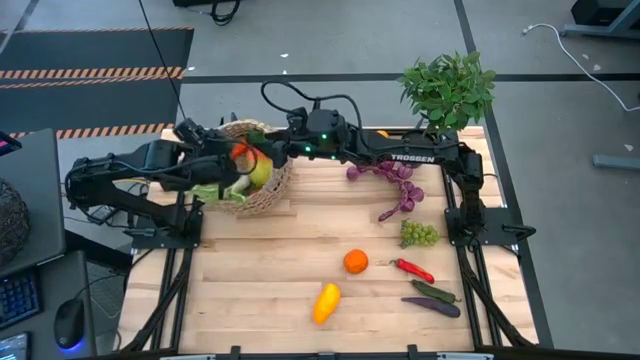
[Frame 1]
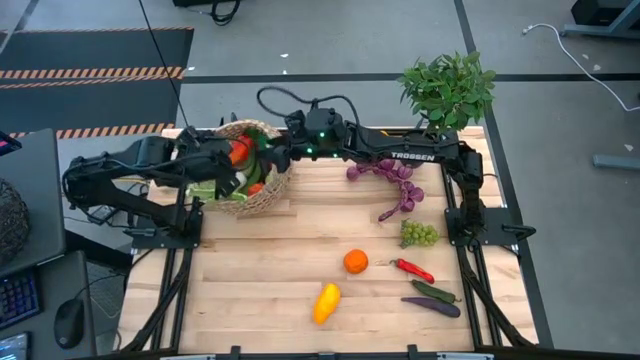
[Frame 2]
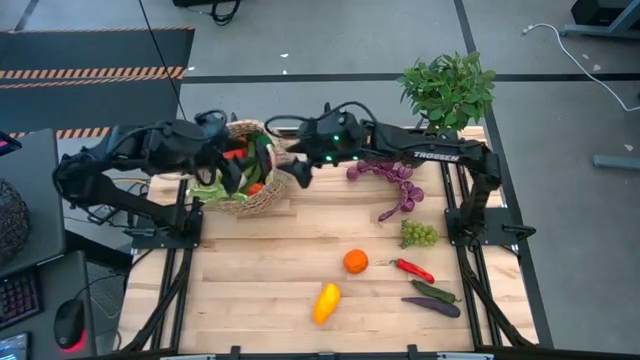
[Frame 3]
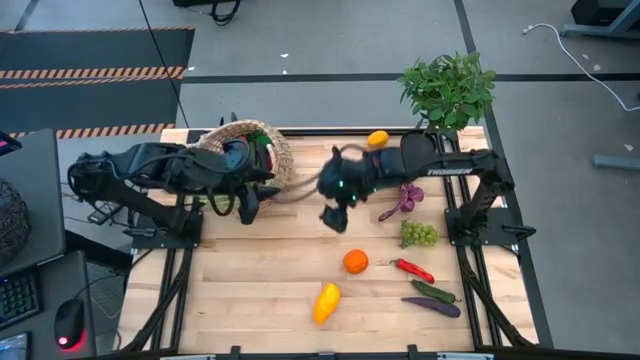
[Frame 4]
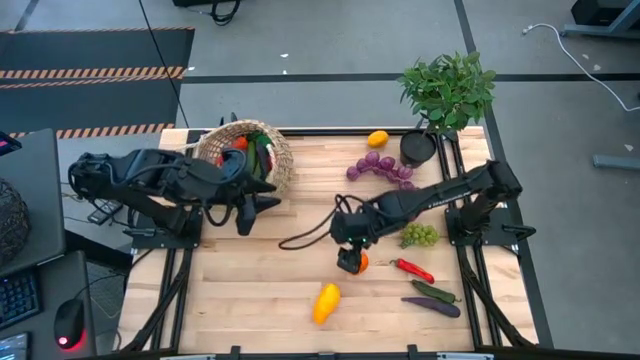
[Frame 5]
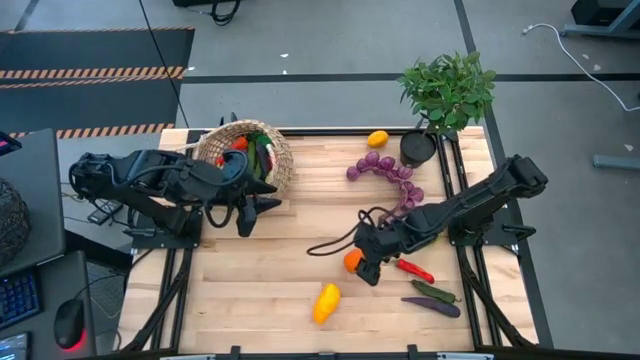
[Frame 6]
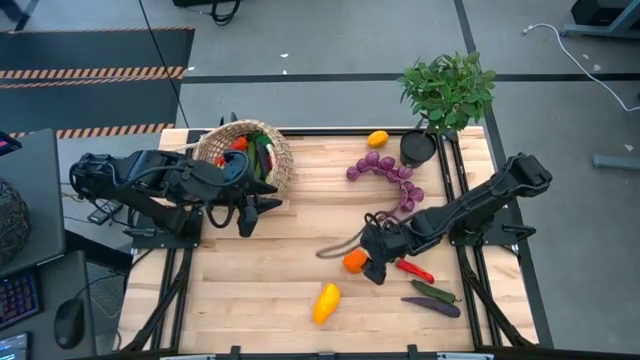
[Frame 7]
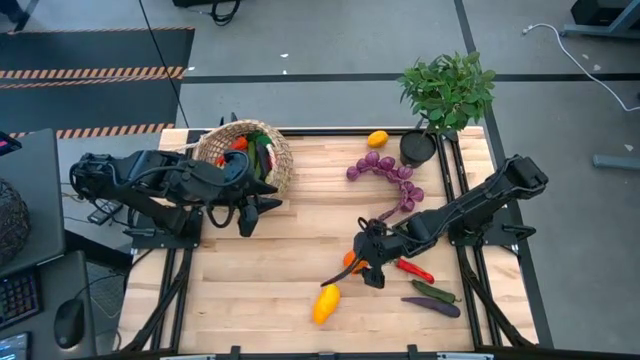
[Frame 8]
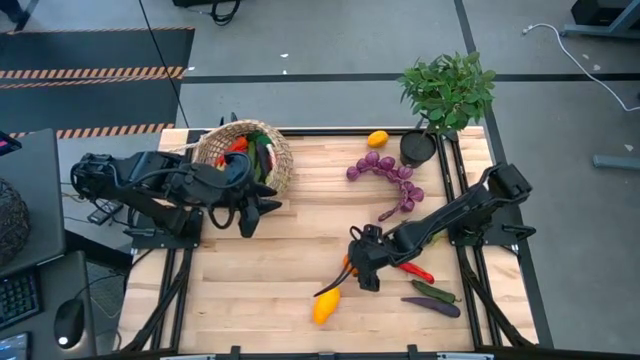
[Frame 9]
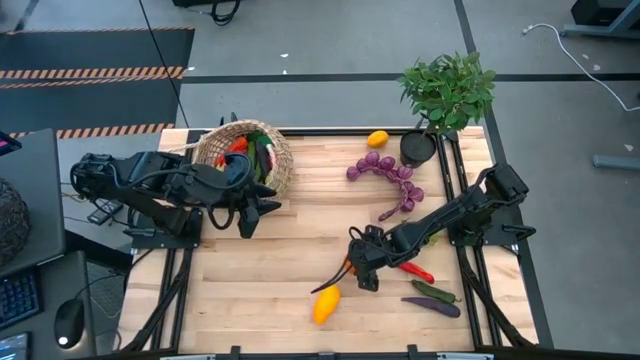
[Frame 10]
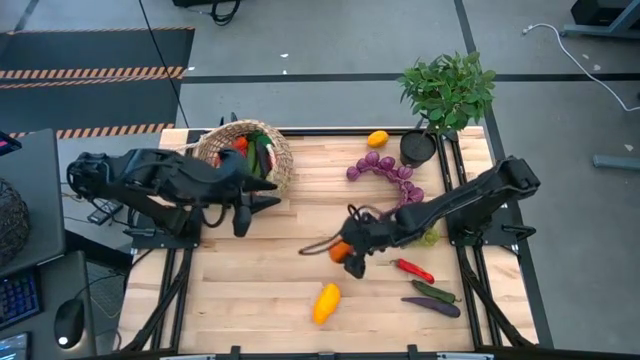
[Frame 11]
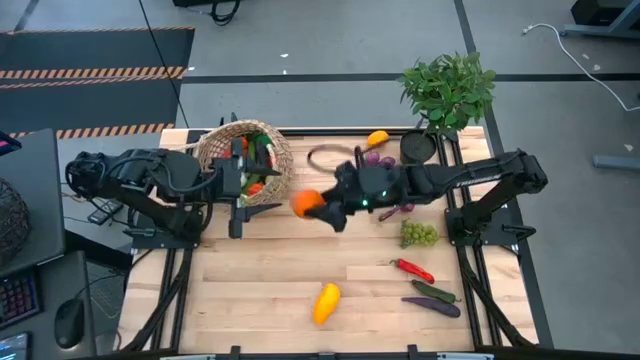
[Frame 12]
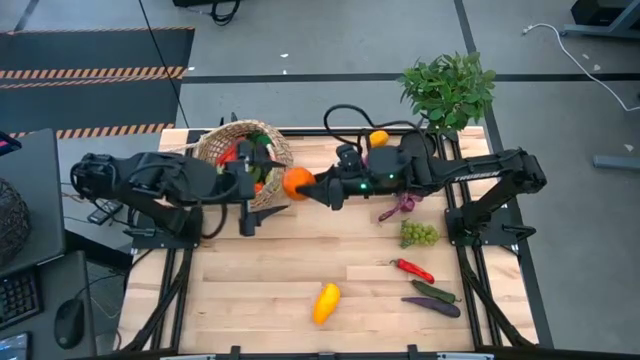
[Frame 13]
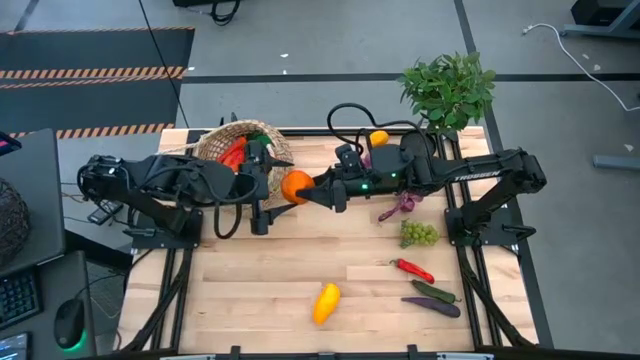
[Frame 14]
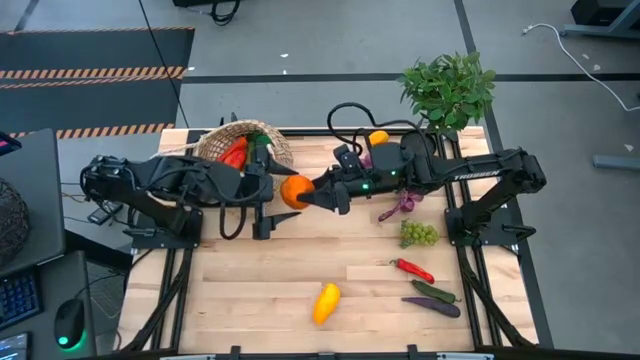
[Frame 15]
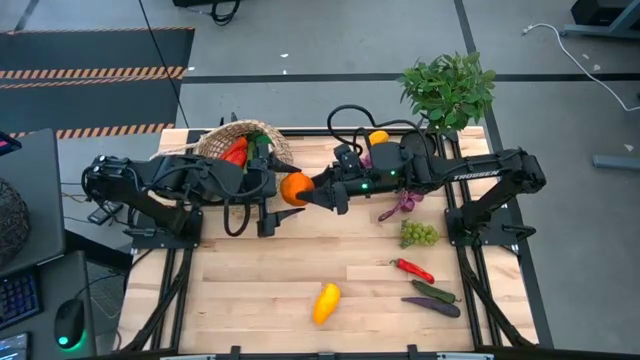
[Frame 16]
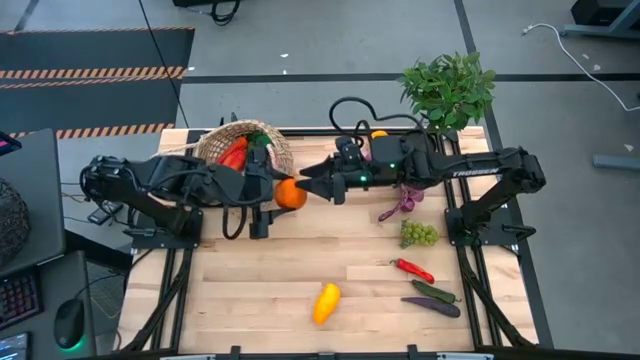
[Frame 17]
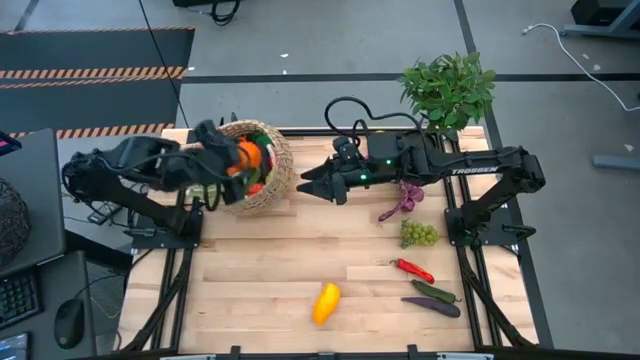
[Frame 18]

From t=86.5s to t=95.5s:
Task: Build produce basket
Put the orange into the brown basket

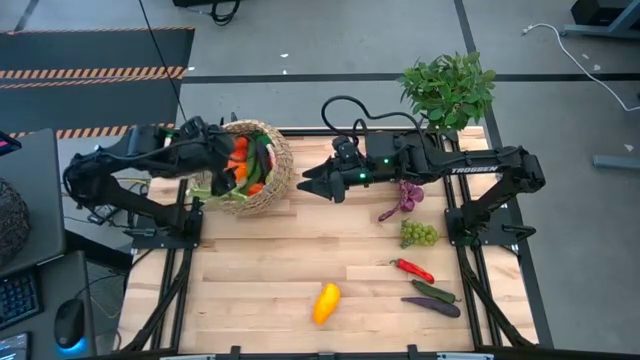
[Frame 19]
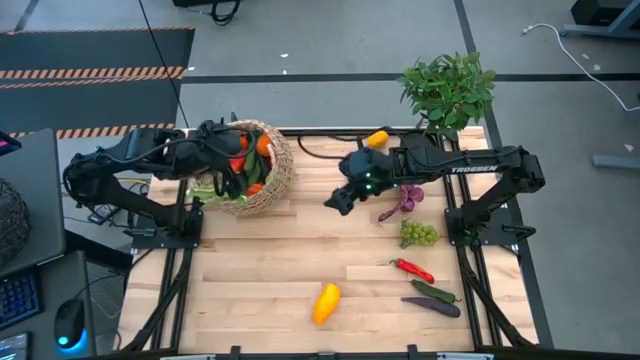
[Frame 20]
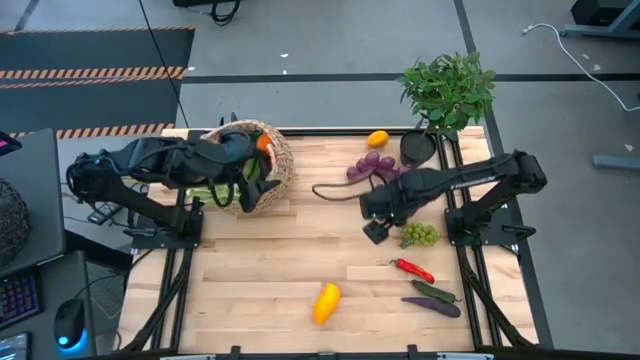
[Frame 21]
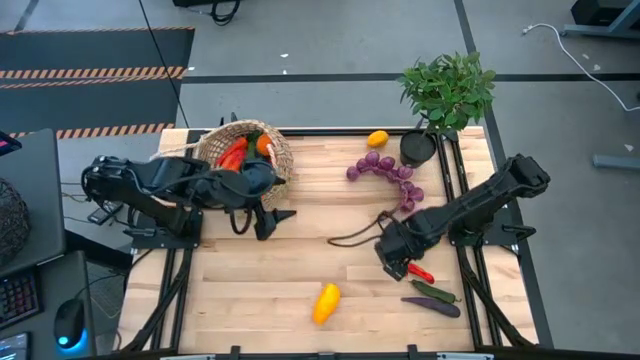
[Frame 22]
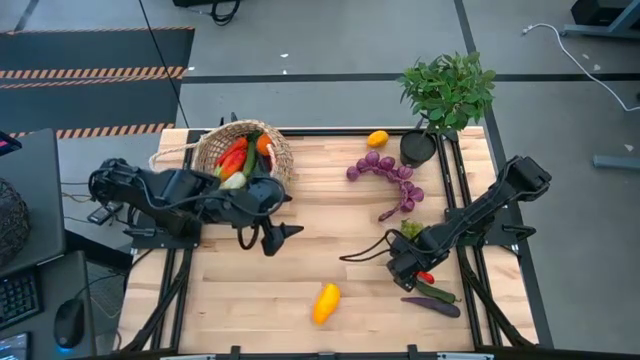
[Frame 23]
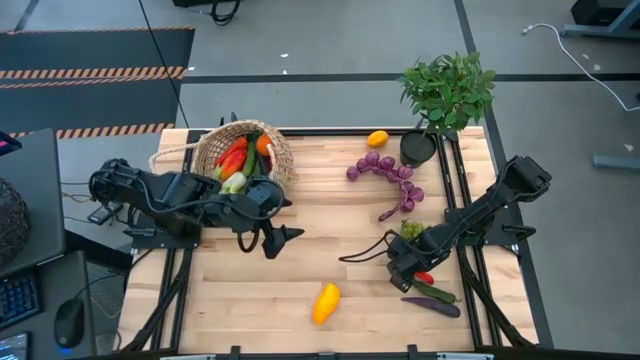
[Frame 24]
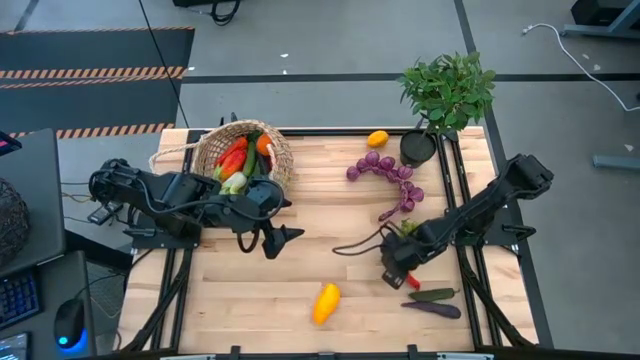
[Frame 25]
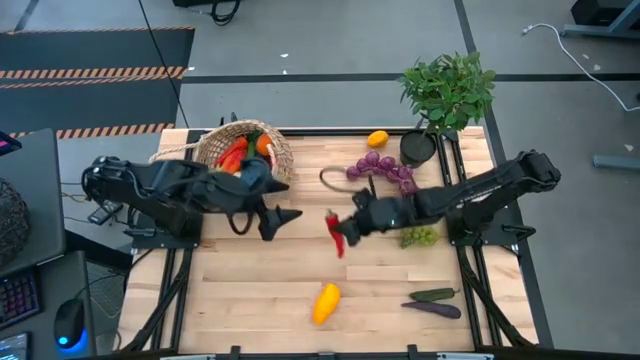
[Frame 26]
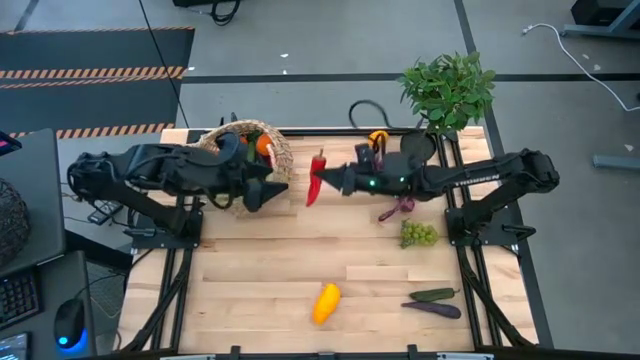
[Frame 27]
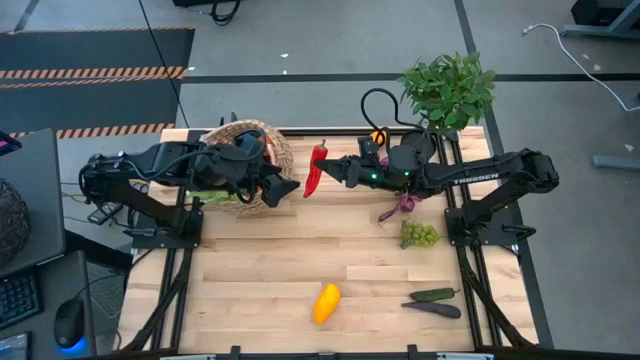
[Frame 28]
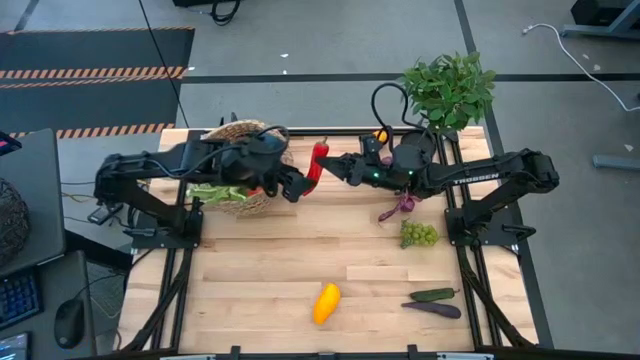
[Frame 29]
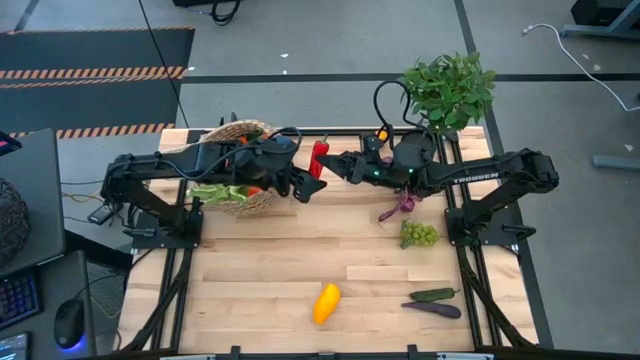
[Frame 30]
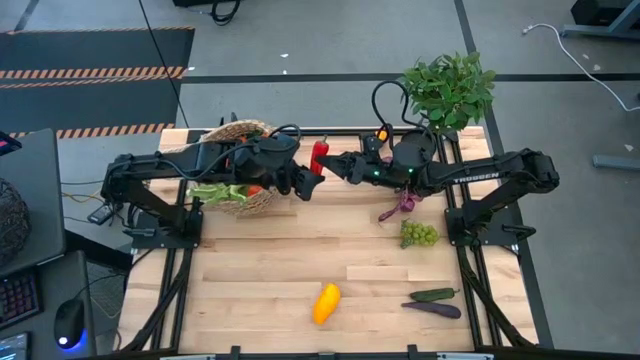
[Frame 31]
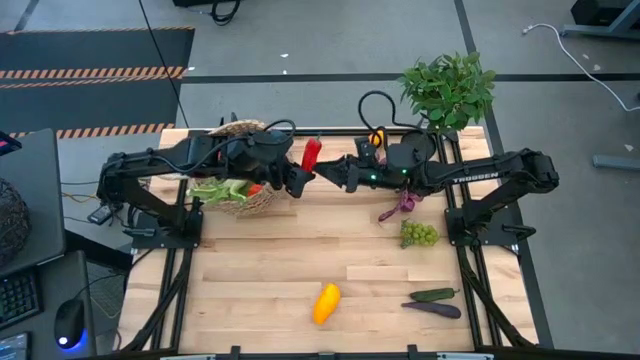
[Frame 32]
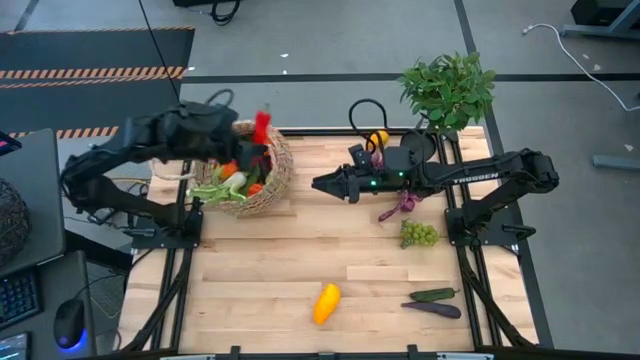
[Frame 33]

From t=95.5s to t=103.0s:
Put the red chili pepper into the brown basket

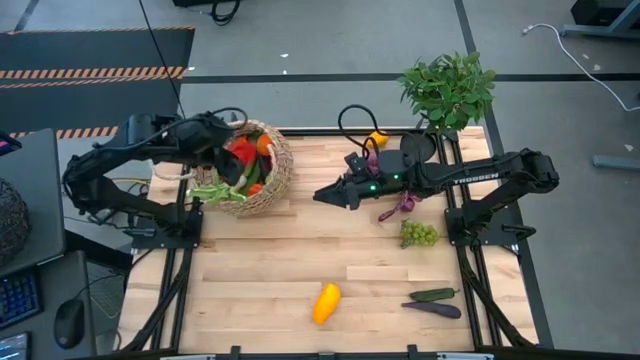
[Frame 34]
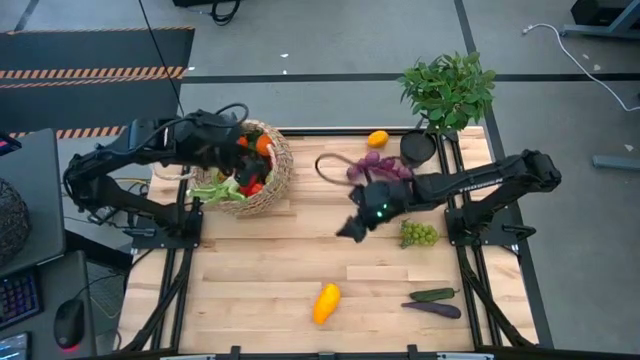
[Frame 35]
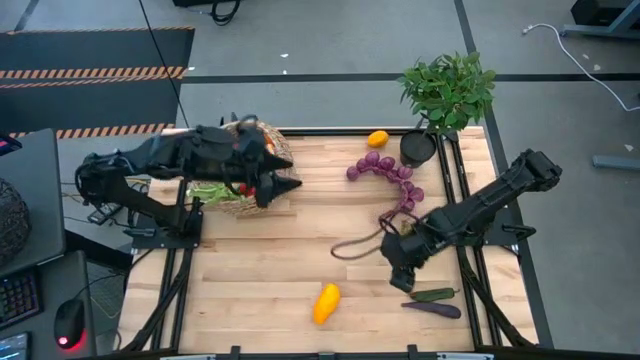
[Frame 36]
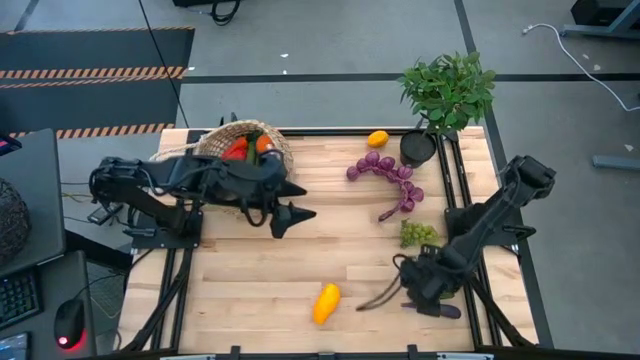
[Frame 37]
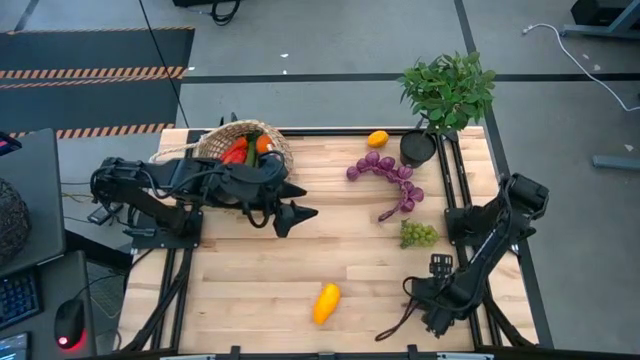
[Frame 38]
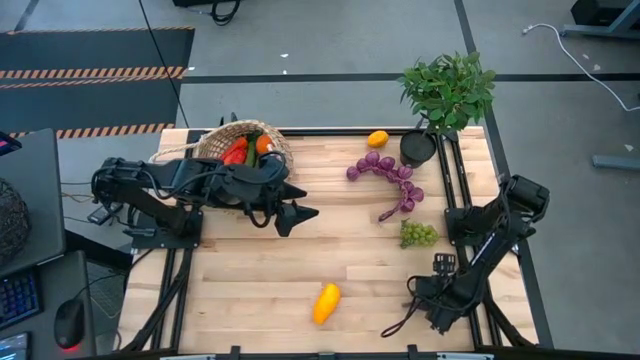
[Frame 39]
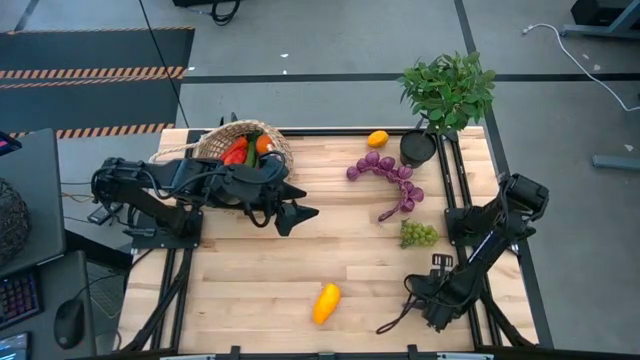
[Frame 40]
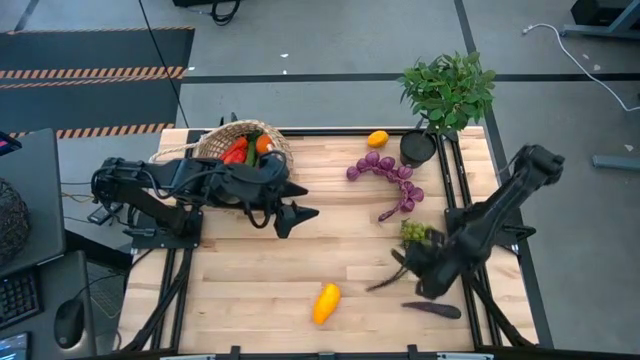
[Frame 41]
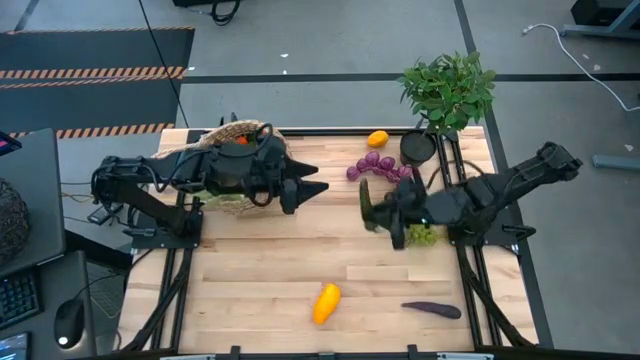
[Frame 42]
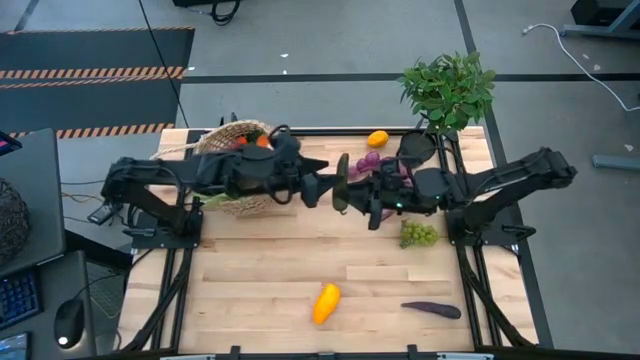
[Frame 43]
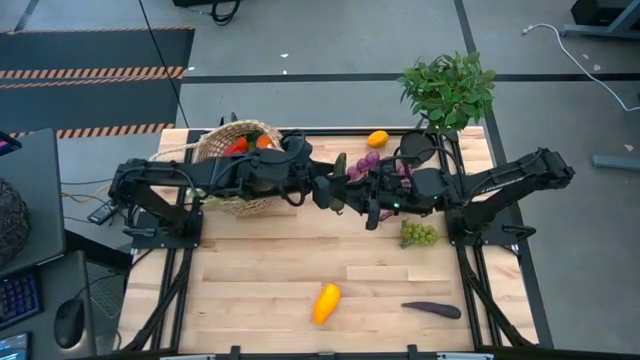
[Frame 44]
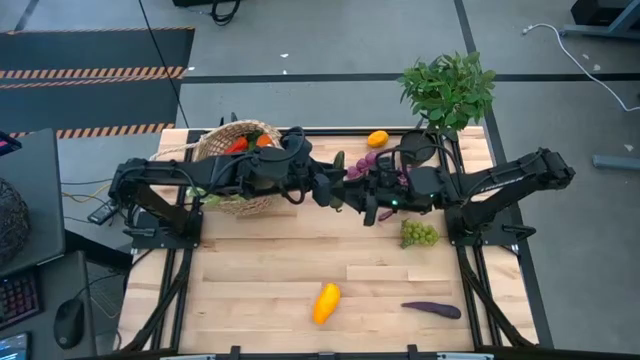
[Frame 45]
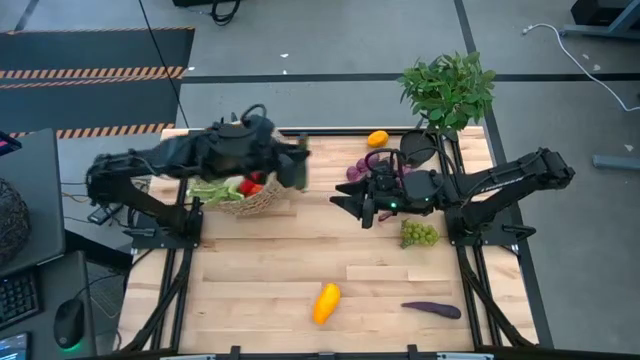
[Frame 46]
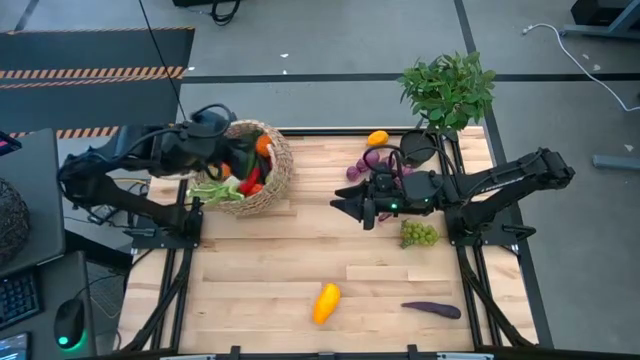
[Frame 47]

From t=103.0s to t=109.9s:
Put the green chili pepper into the brown basket
